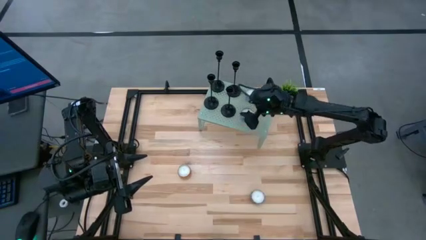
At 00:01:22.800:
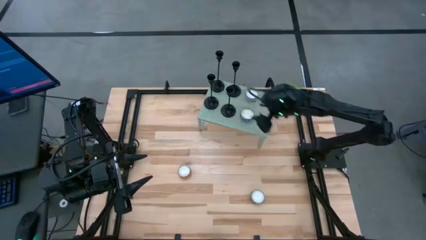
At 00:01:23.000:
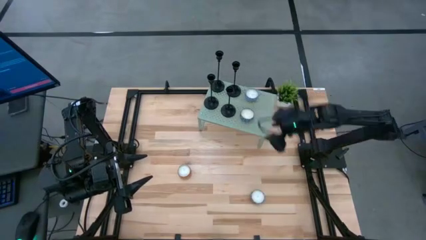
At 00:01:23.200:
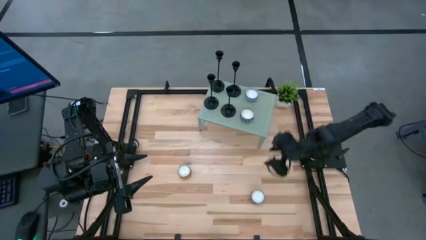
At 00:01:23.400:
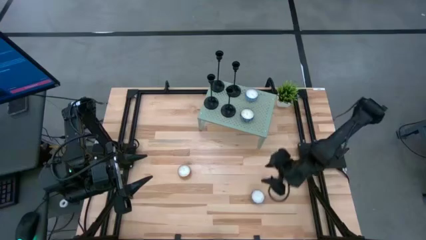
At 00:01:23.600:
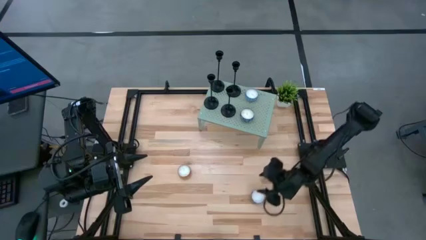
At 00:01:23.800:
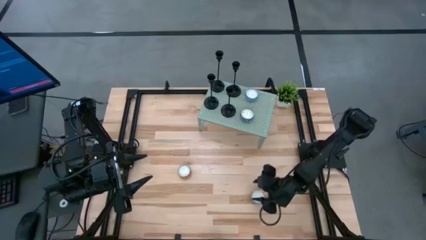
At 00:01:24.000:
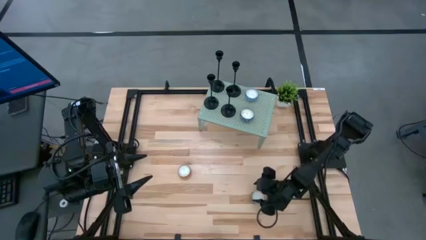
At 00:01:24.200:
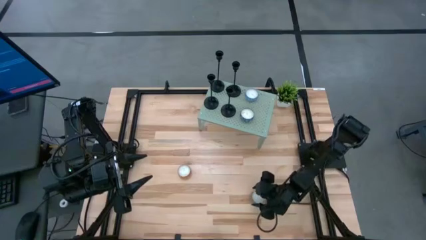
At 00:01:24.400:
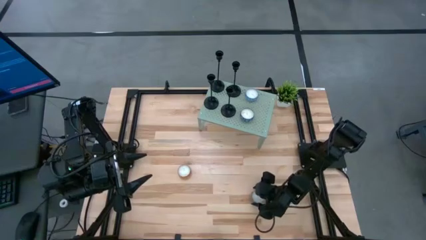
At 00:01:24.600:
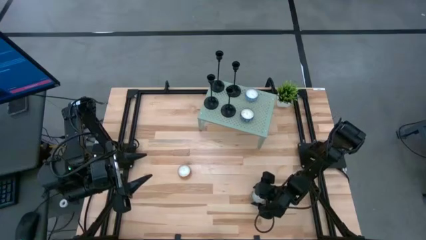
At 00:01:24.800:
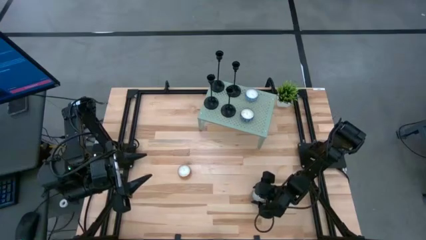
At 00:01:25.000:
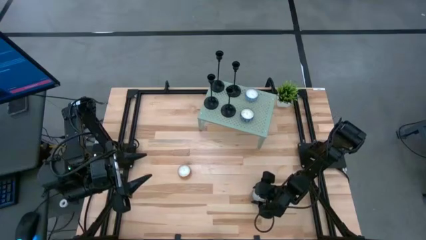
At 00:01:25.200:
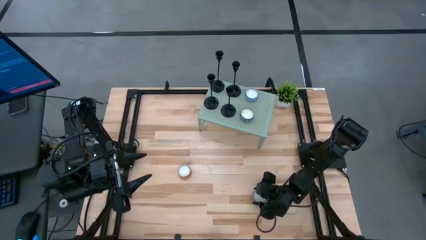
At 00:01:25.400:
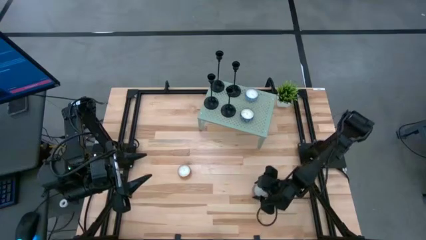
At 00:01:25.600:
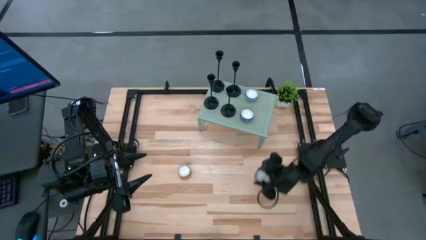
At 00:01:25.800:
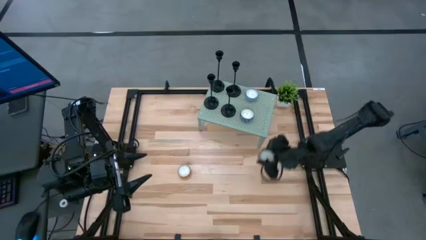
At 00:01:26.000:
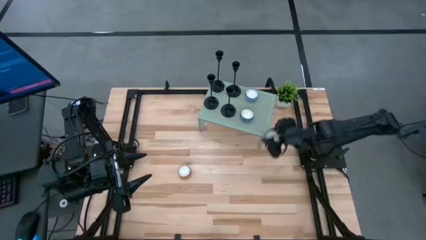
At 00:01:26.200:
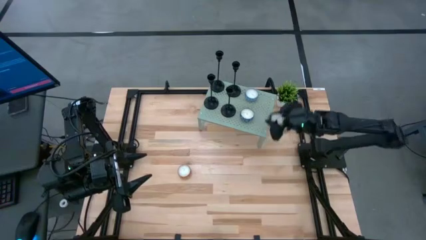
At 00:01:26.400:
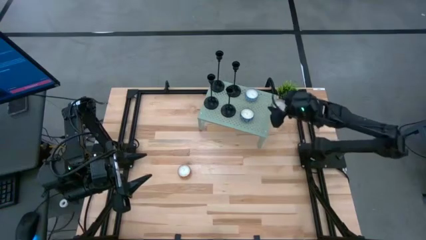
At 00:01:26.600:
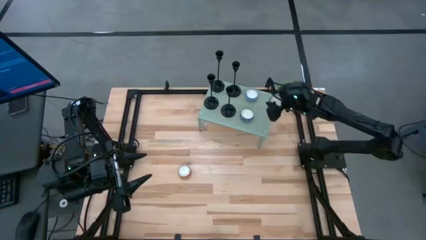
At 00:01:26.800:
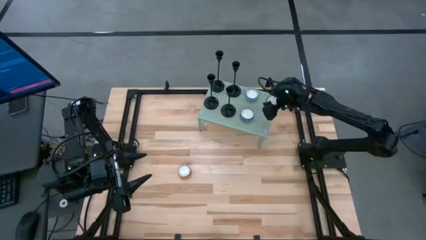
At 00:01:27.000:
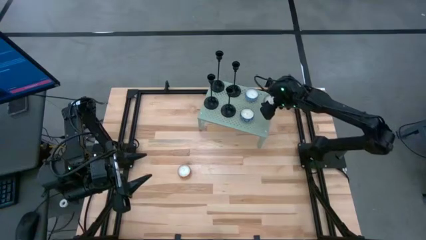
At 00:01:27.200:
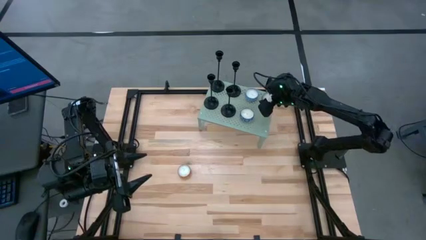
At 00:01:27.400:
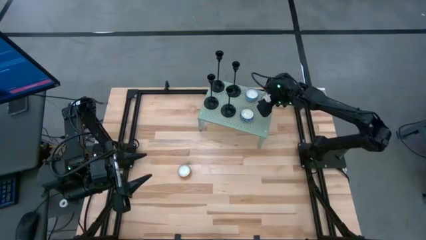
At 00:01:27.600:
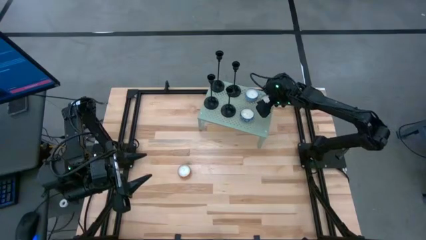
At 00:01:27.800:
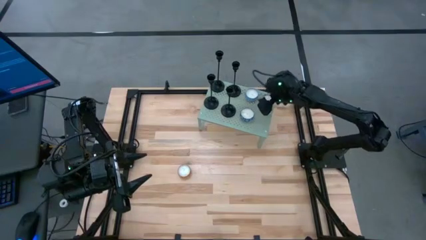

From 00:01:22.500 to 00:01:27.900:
Task: Pick & Place candle stick holders
Put the red scented candle on the shelf

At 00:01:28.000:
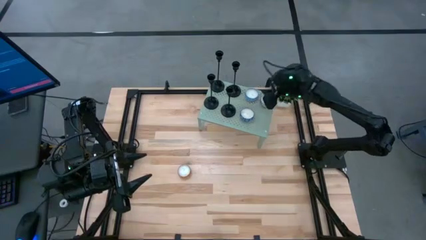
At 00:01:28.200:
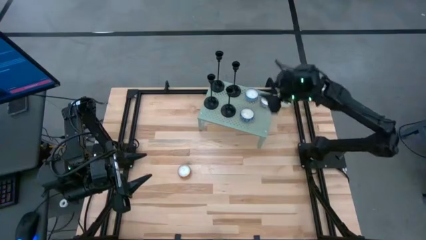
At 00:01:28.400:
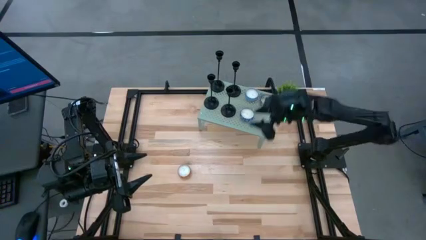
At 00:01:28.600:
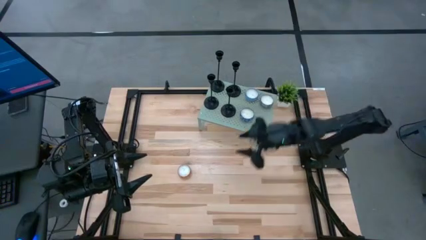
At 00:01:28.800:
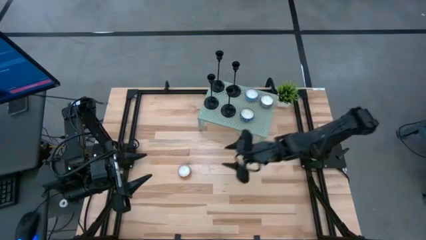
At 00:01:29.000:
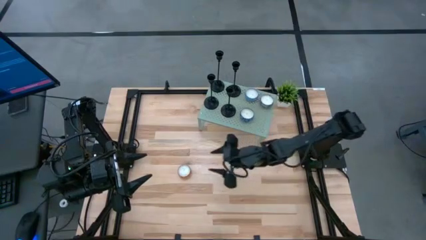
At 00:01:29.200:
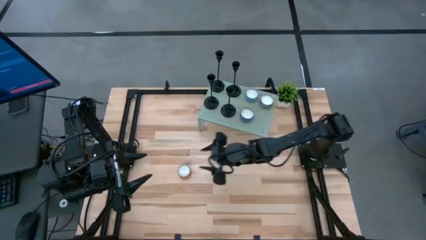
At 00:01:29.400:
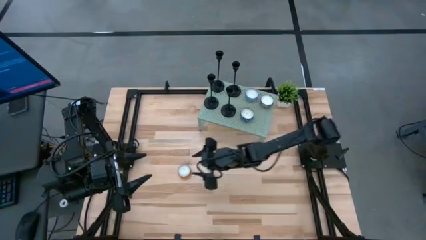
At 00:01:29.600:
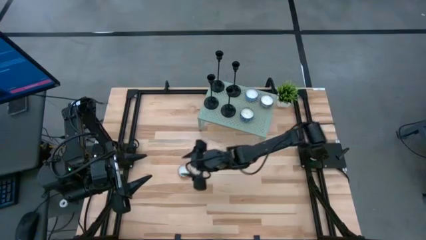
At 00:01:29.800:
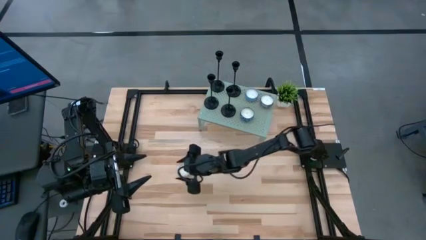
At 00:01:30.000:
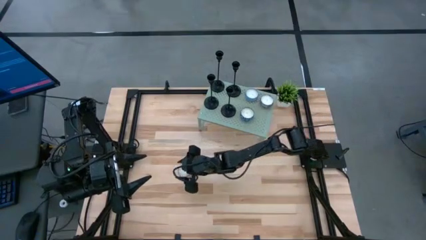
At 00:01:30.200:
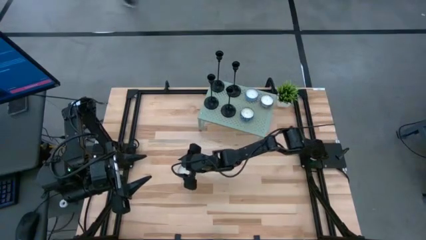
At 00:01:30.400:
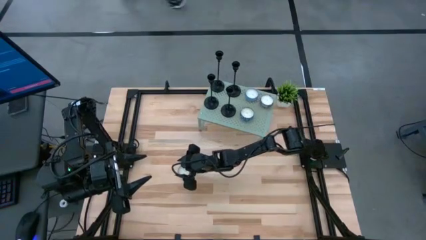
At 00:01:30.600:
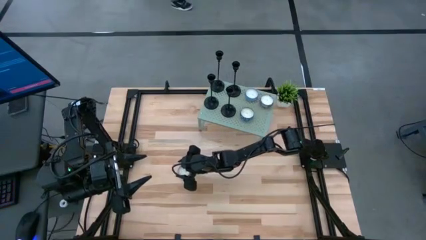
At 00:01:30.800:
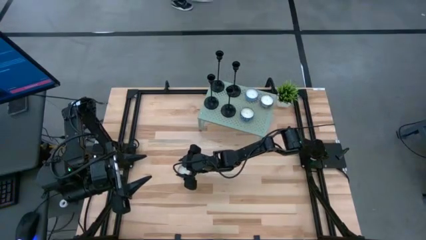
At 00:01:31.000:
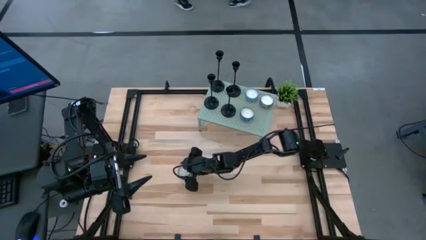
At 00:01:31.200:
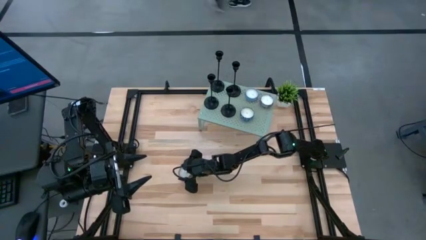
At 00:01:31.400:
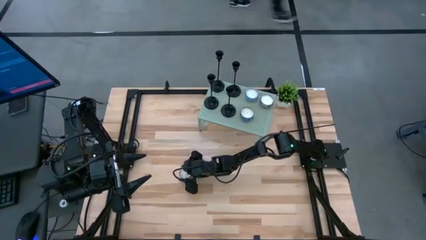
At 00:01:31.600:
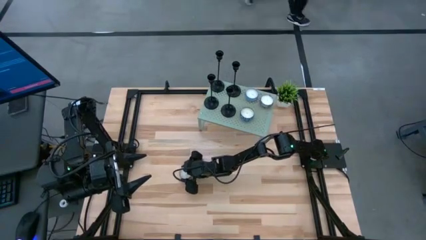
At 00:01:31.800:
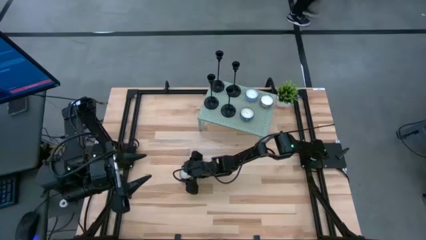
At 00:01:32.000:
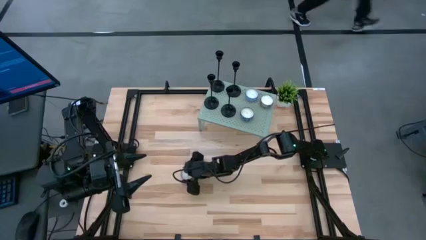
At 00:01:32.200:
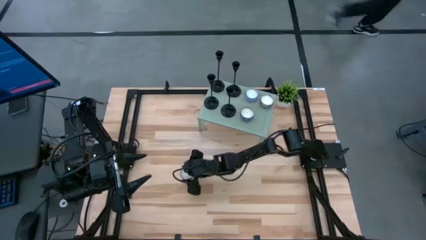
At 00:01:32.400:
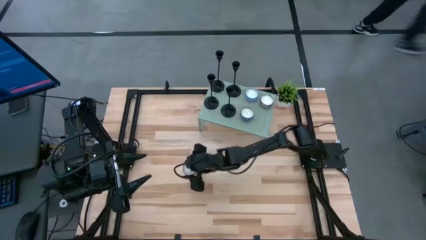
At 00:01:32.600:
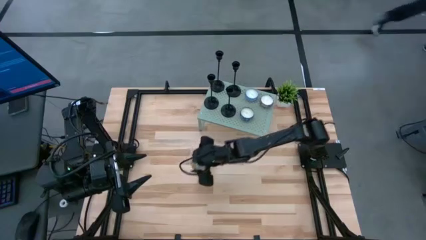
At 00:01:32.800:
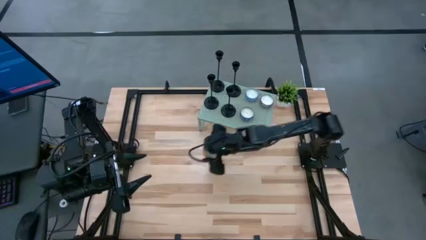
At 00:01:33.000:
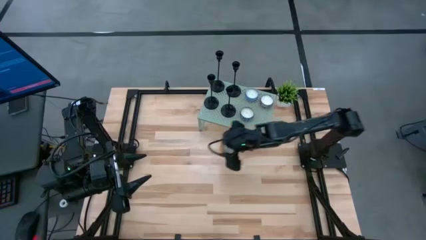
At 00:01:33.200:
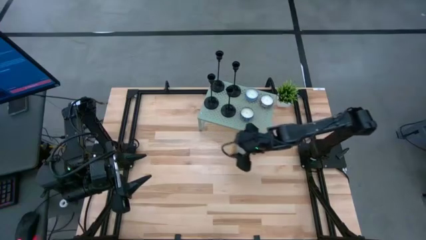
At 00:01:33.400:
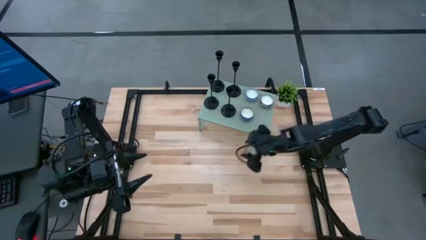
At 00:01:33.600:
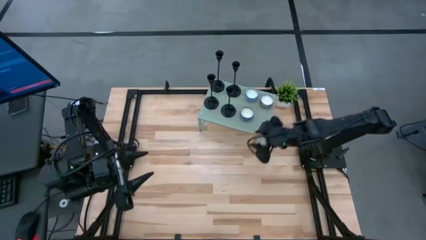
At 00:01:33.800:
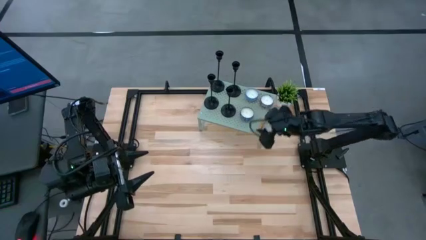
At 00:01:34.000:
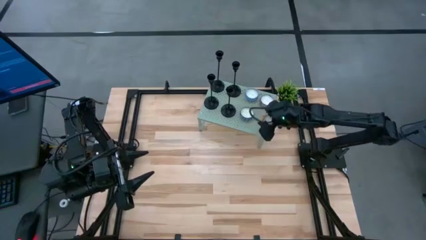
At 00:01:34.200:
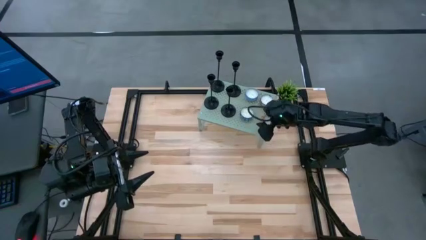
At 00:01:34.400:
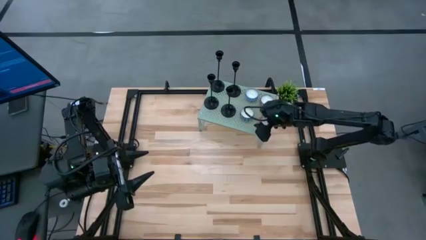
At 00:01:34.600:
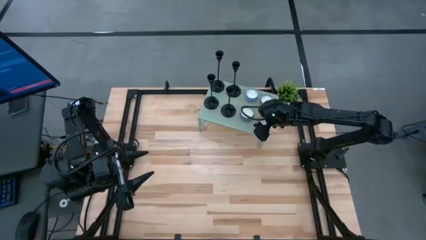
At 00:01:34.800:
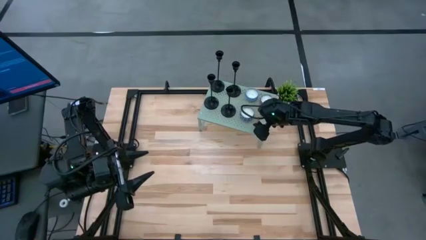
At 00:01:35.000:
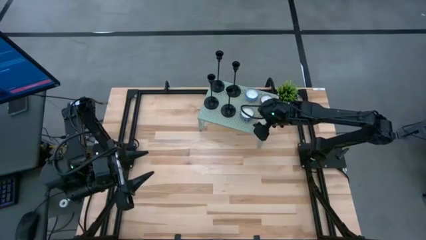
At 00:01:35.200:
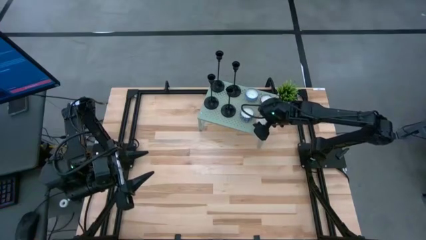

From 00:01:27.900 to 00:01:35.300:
Put the orange scented candle on the shelf

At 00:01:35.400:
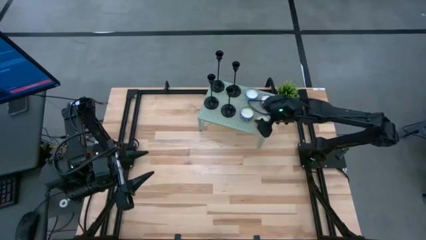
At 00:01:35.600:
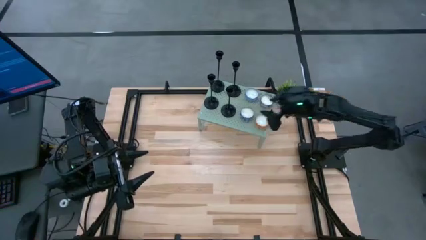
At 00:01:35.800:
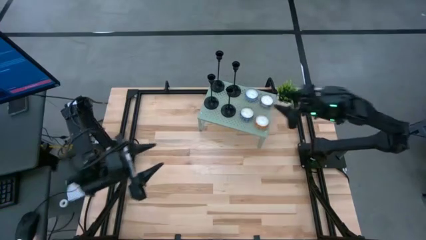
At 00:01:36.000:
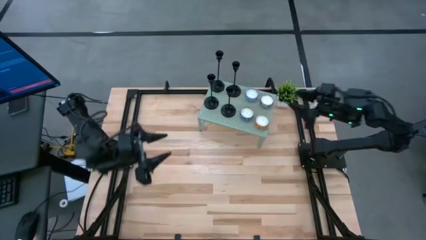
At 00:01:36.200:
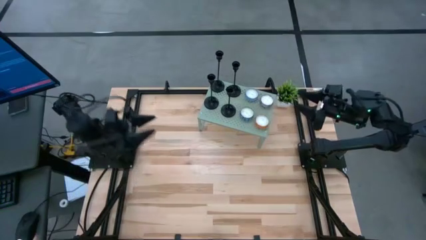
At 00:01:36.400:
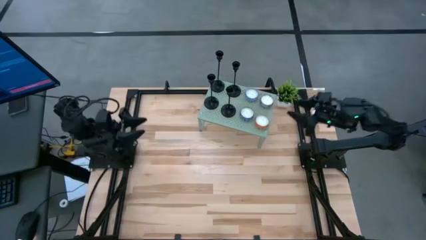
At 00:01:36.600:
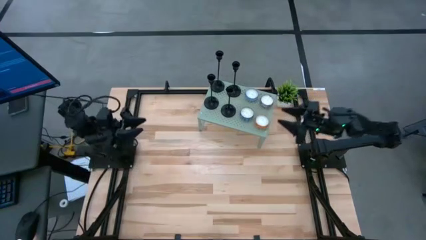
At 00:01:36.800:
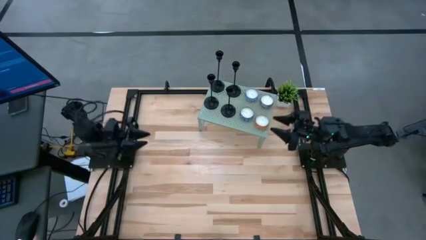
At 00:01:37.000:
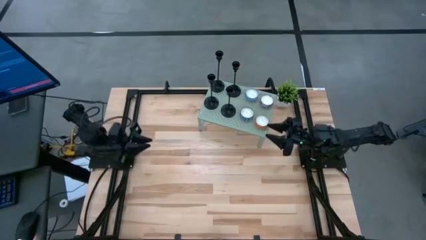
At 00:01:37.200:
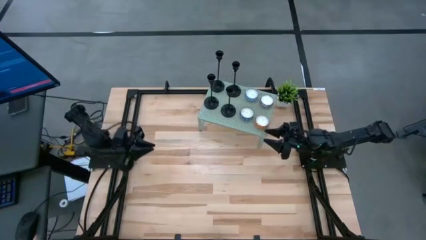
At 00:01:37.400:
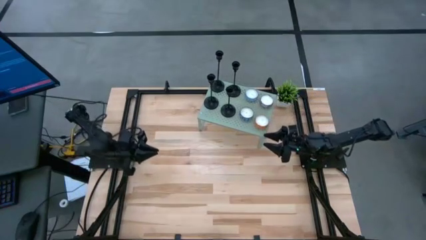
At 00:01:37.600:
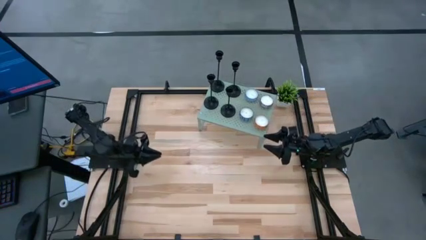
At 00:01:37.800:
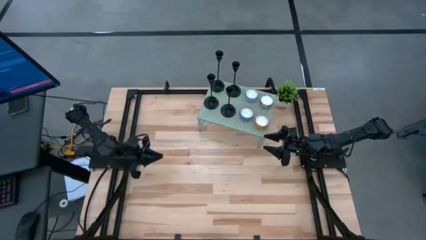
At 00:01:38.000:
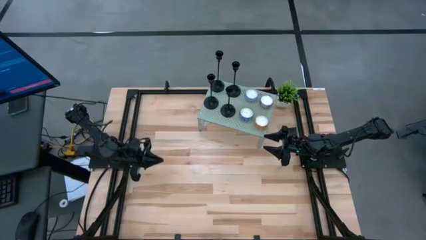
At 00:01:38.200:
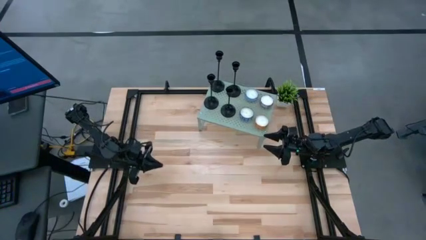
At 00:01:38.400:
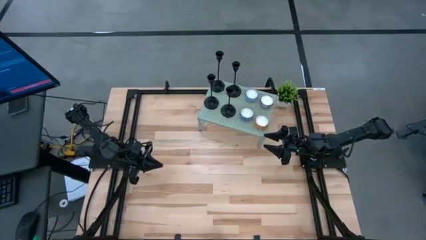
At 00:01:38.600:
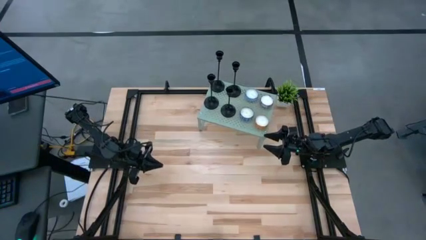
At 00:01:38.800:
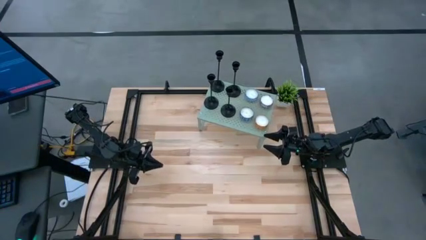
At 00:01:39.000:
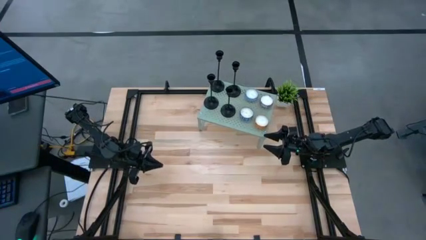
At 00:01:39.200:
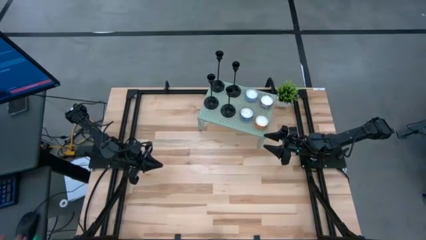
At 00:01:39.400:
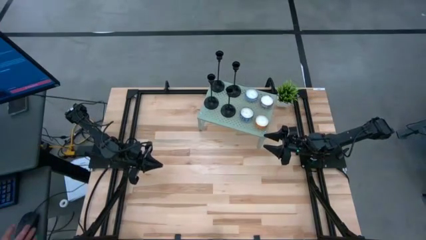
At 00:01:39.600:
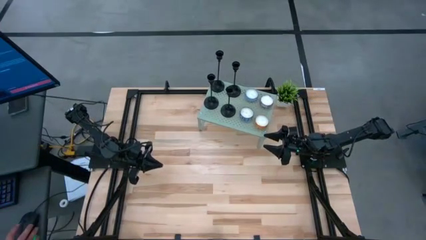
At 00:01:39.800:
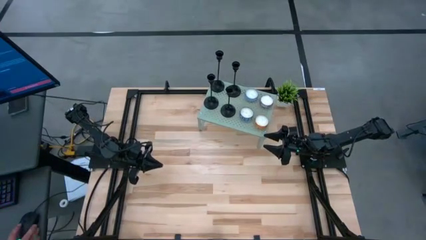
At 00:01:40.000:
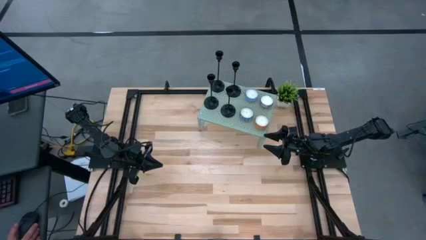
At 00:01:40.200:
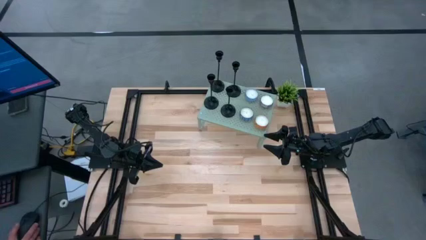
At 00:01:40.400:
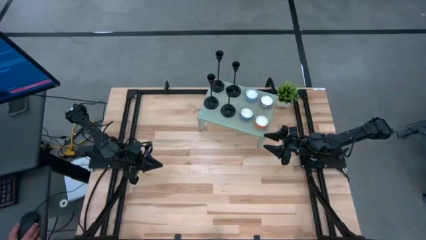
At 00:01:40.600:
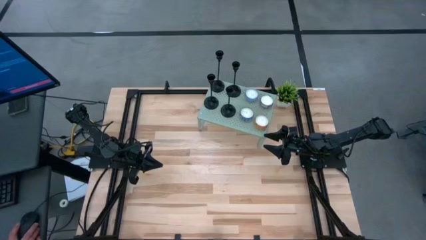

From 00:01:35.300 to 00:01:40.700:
Return to Home Position
